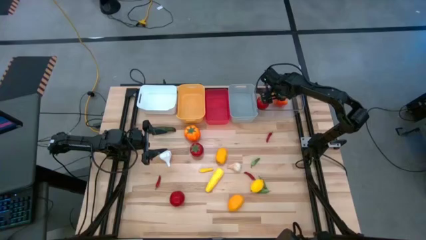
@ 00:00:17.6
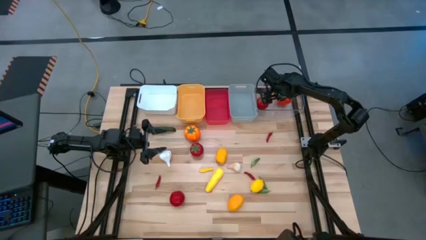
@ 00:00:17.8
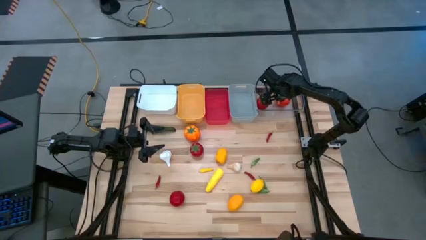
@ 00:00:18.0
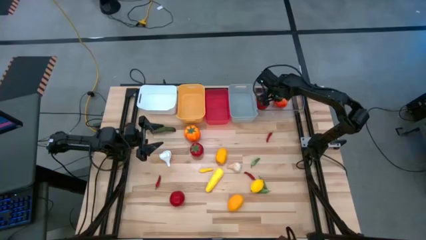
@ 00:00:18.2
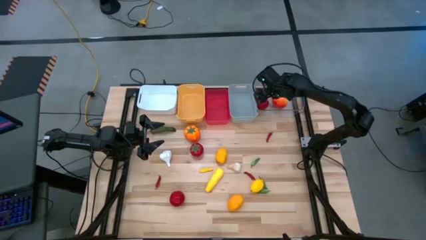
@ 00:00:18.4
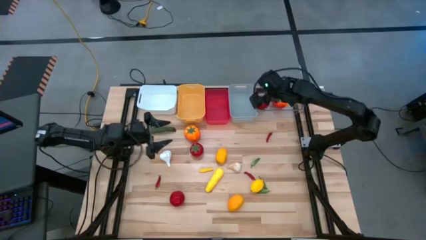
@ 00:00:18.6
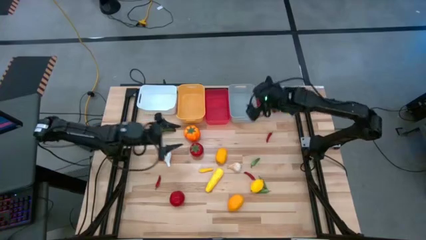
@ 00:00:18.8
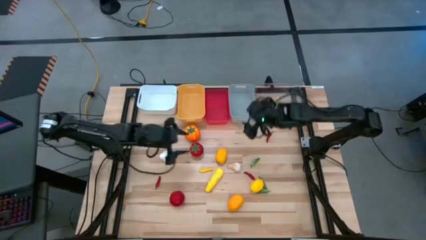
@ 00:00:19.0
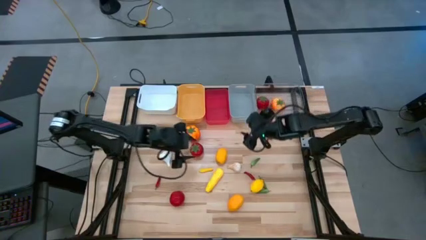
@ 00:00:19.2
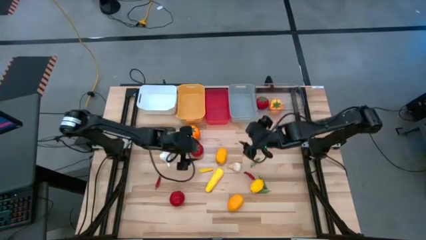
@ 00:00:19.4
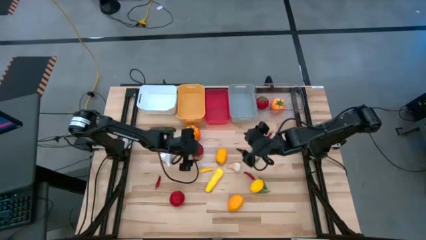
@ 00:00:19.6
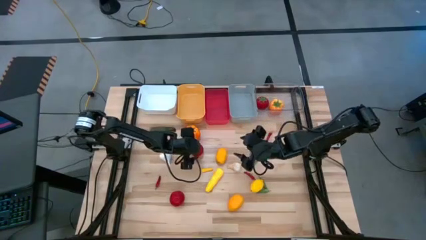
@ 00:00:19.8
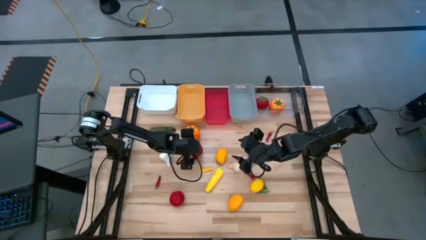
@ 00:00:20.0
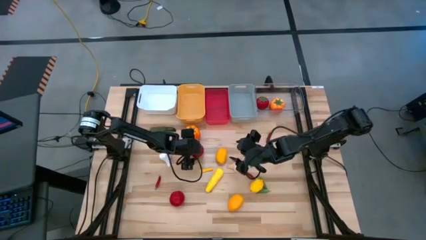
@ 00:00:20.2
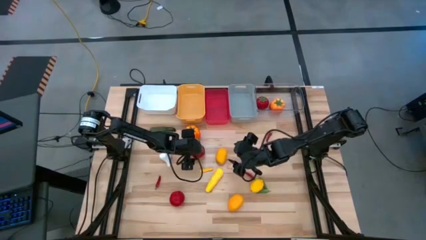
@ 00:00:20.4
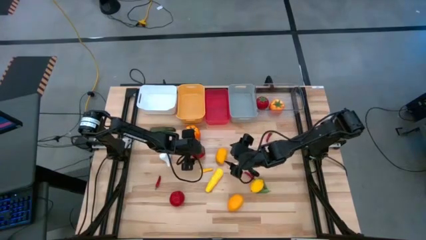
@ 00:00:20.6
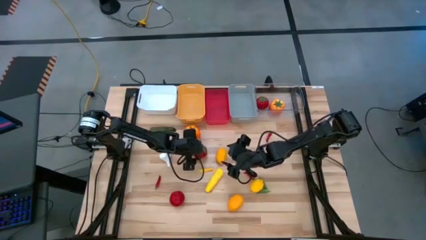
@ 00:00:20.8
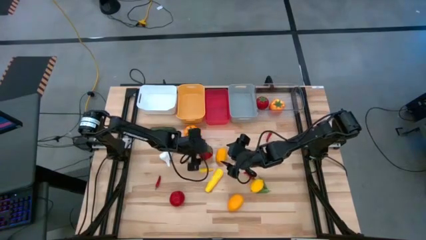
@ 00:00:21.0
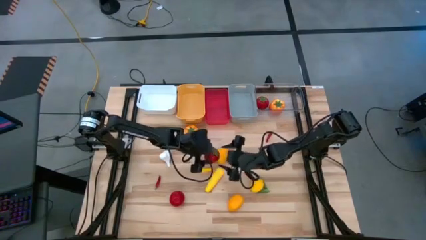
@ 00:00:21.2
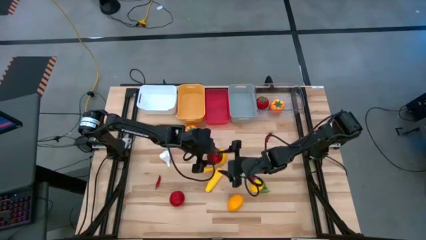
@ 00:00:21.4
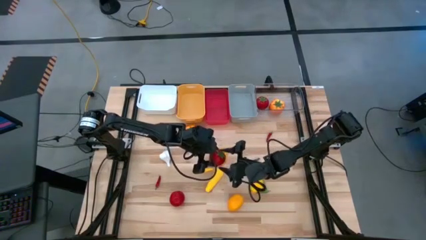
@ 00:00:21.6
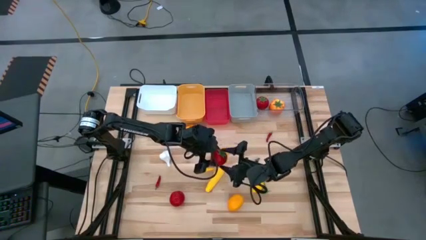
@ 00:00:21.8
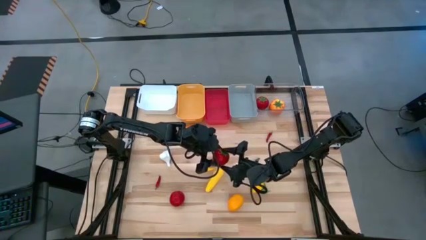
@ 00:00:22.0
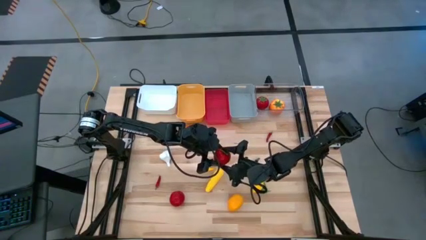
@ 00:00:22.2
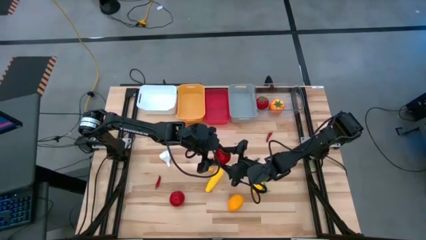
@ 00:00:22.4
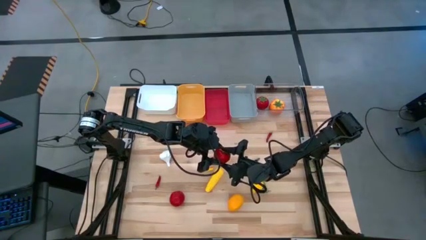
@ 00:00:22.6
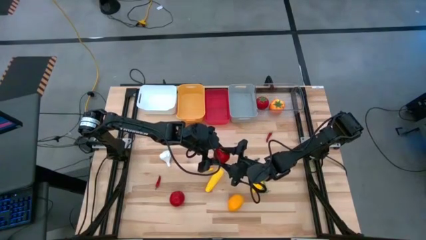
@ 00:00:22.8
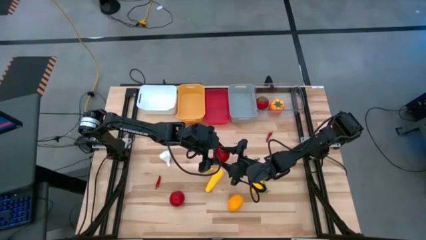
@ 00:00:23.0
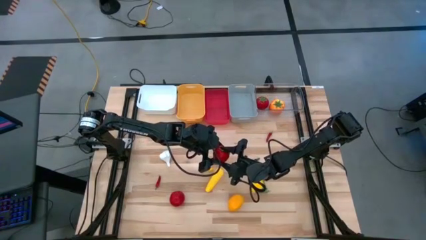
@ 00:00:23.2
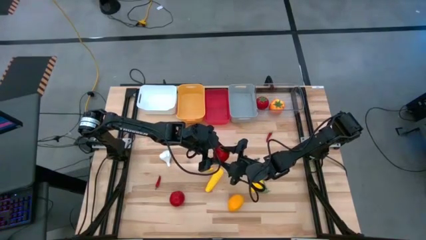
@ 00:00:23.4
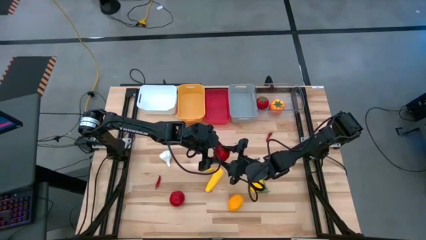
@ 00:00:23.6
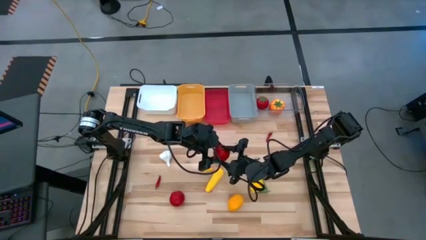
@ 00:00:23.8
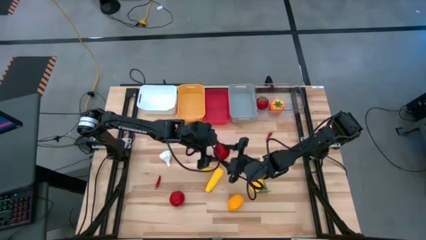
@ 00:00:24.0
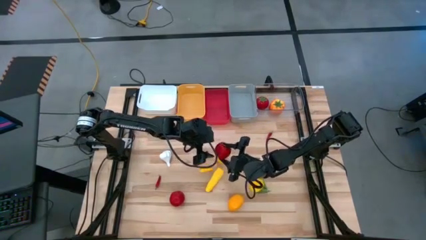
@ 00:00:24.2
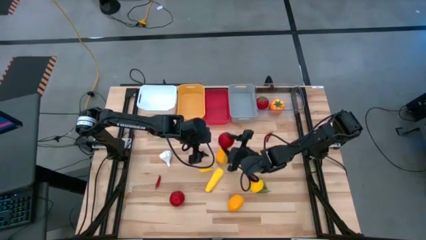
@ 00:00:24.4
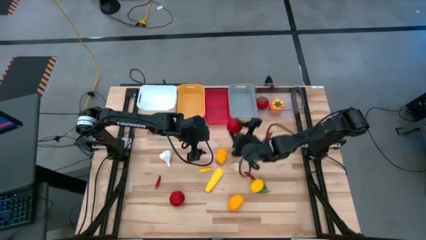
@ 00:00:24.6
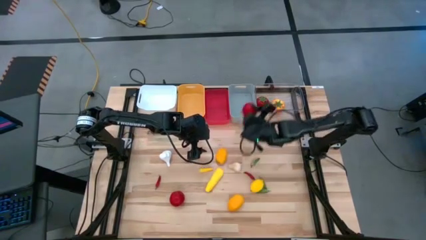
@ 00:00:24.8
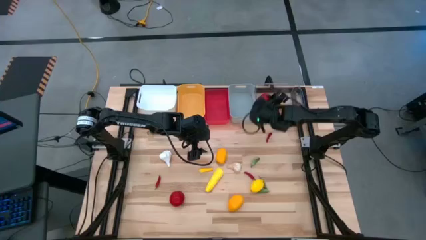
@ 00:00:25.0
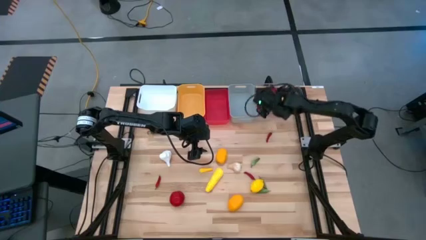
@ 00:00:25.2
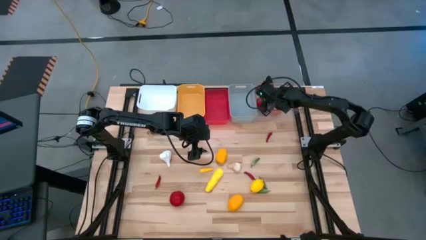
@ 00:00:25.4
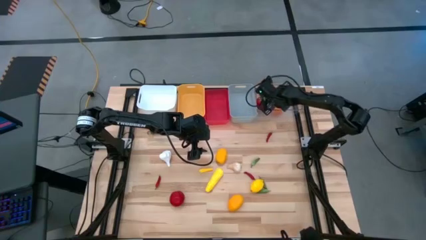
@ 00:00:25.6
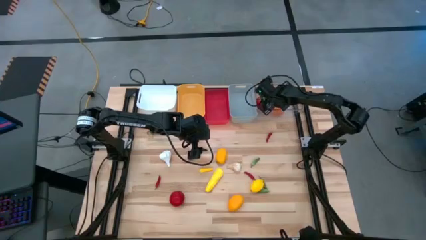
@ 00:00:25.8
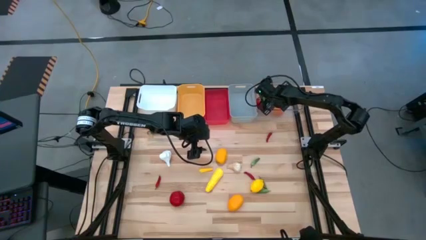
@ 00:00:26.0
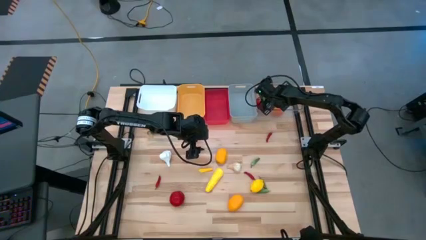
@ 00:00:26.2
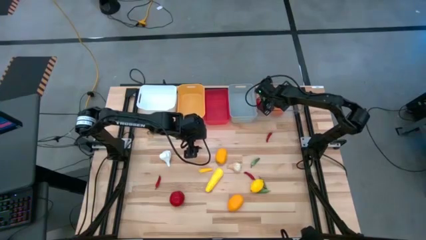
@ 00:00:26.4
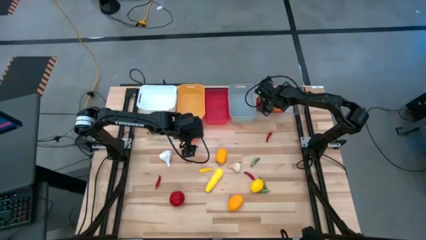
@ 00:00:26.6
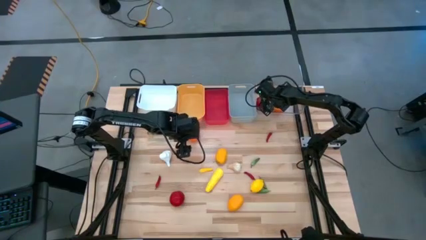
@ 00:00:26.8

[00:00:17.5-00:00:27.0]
Task: Sort produce into baskets
Put the red tomato into the transparent bin

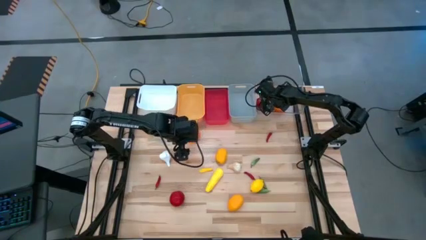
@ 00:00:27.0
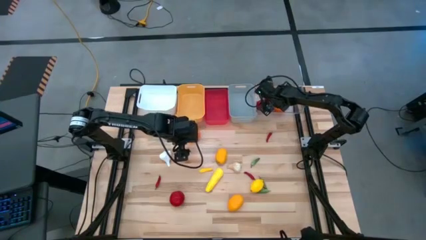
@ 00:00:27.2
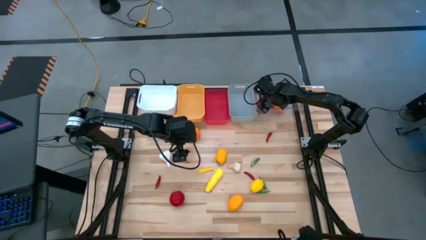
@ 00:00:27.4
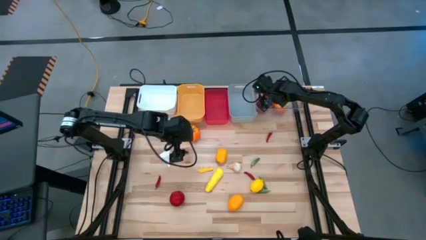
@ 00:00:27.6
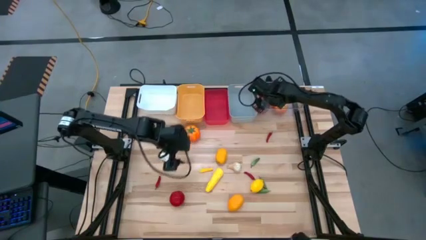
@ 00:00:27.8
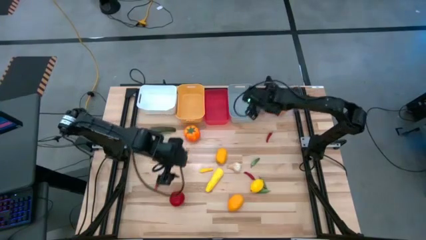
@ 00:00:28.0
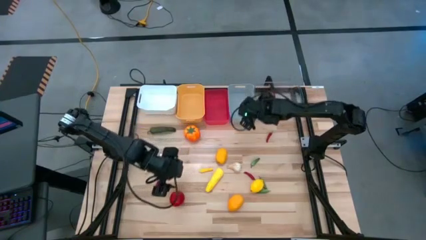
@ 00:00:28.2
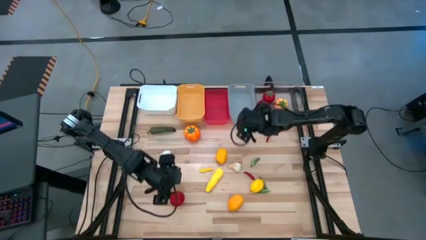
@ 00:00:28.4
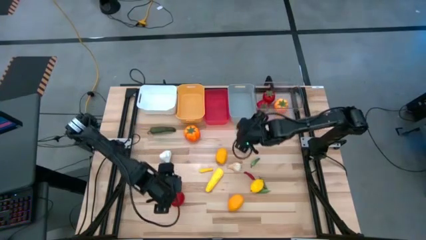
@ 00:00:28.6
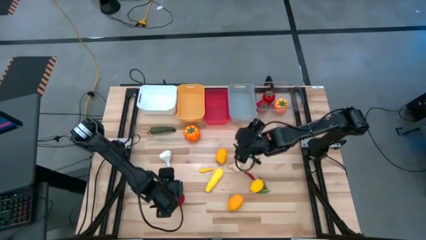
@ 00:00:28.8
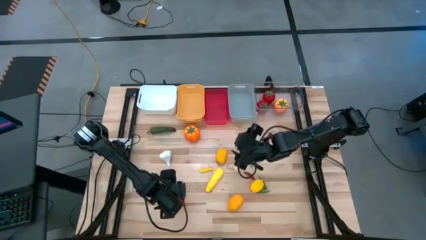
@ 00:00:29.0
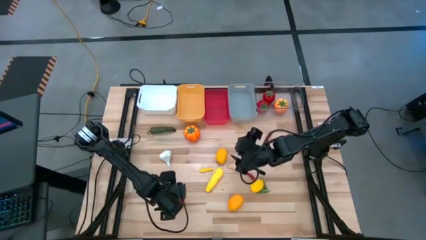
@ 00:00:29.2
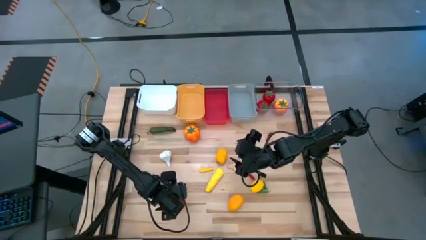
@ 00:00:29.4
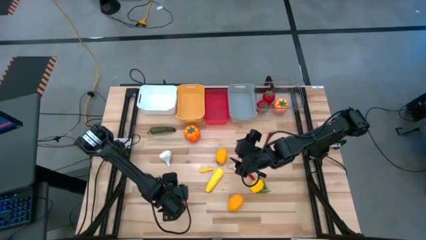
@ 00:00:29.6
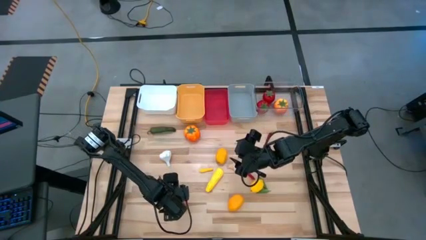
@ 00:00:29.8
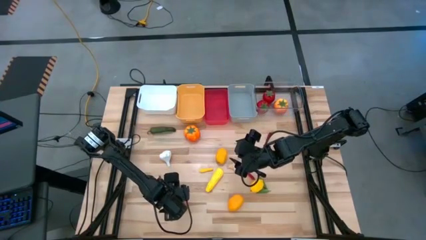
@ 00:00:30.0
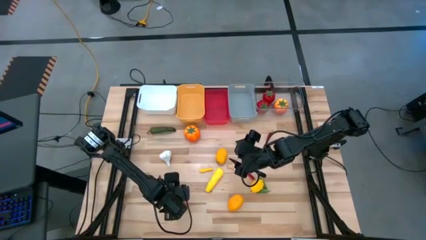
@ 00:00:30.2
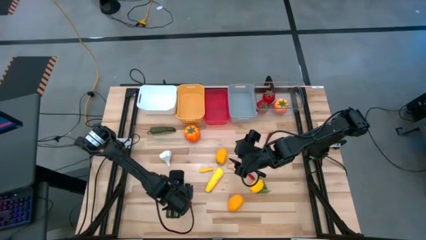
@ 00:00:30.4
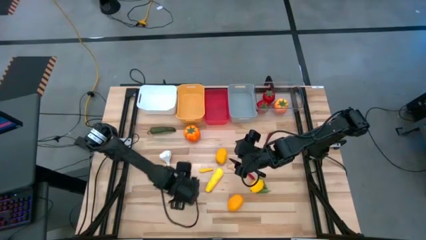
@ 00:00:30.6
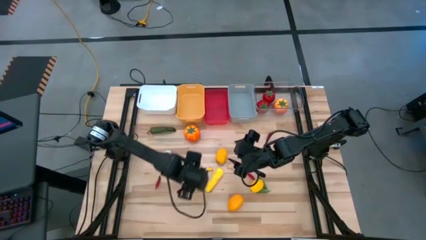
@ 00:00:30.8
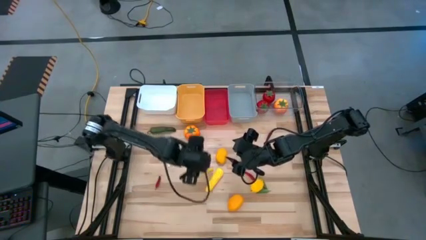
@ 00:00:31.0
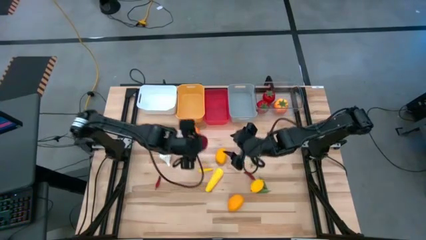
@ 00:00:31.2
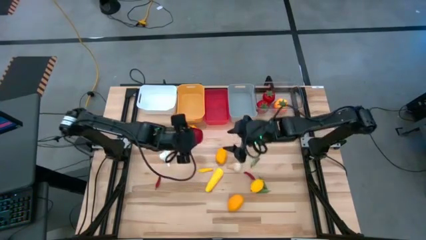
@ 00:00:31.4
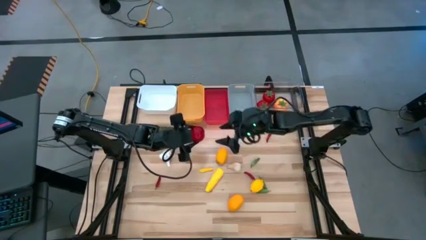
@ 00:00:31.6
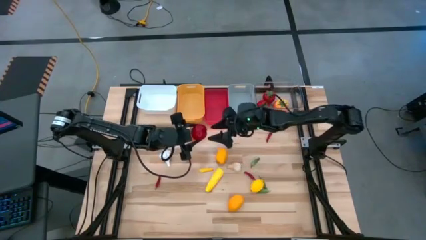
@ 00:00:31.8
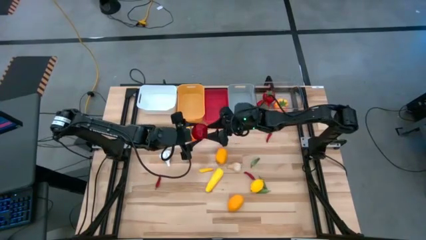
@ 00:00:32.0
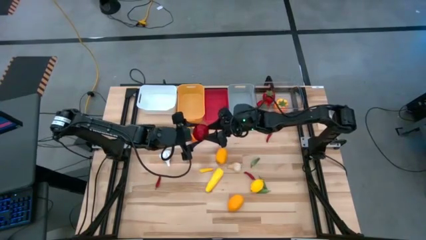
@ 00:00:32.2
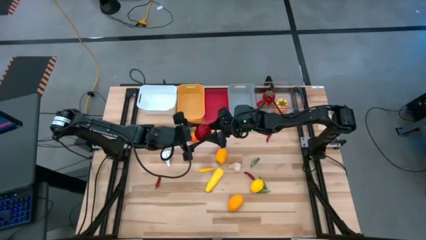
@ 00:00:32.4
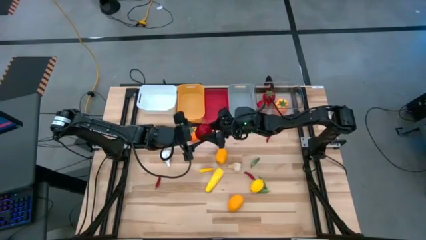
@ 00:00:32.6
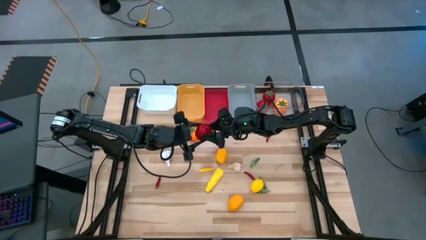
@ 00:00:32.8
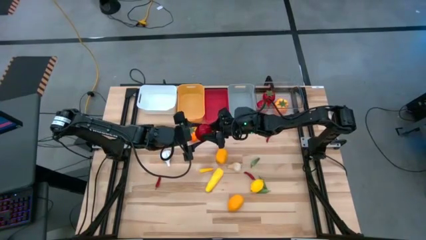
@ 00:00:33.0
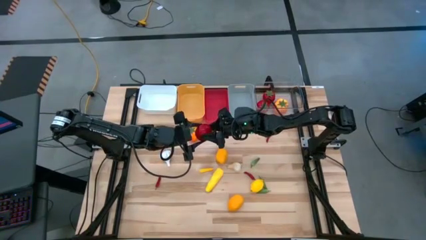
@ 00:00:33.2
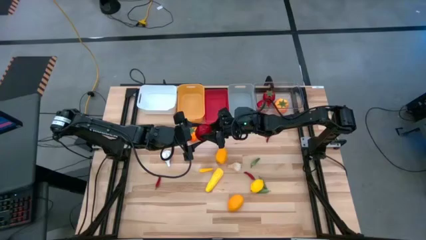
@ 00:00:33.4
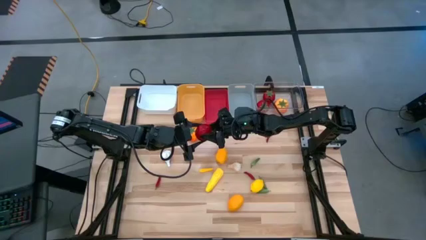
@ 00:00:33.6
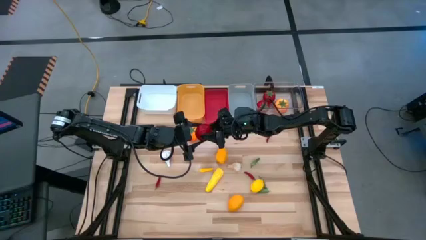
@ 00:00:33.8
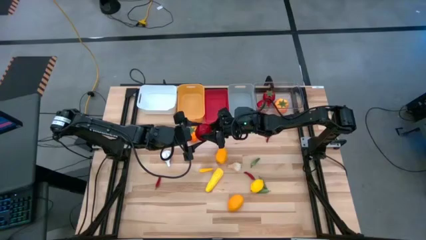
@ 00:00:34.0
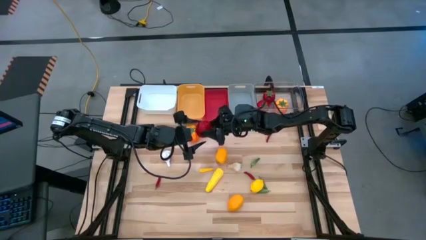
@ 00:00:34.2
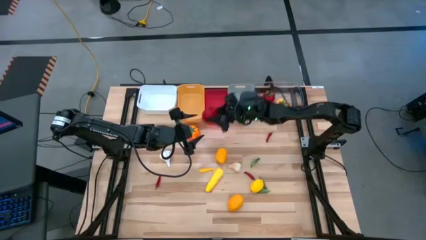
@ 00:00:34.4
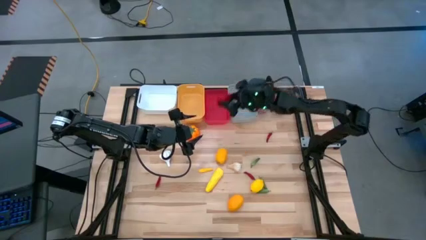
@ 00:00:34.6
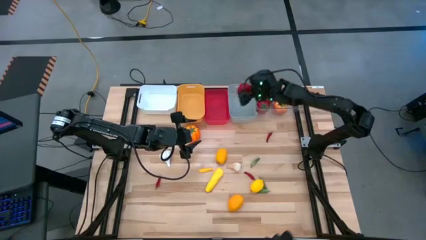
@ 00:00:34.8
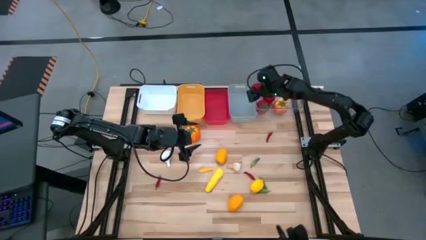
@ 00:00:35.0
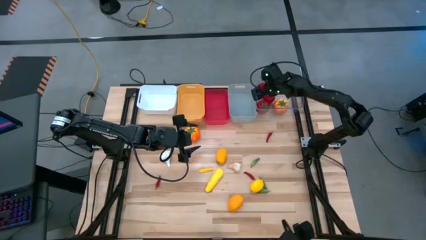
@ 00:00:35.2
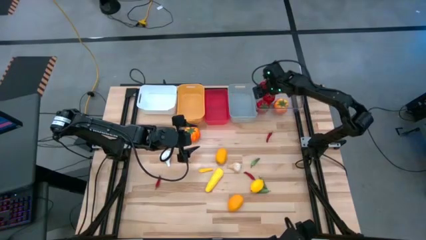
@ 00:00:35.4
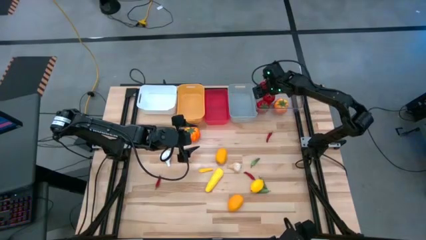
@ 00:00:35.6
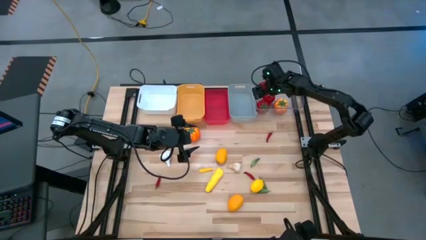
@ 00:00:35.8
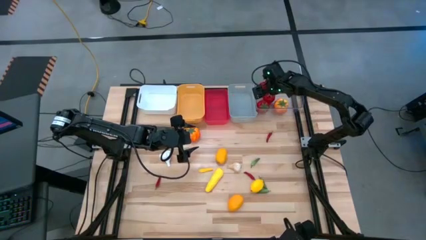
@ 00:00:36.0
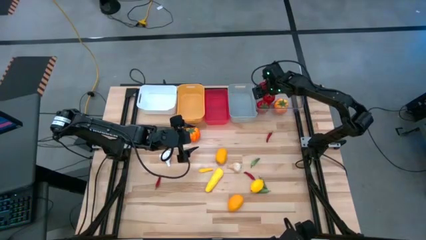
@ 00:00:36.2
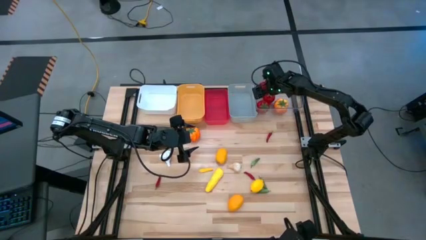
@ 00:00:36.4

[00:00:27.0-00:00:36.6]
Put the red tomato into the transparent bin
